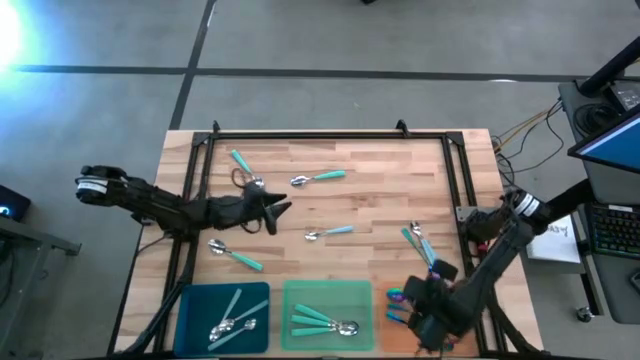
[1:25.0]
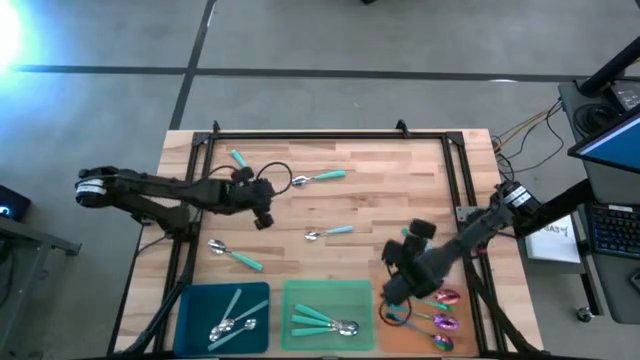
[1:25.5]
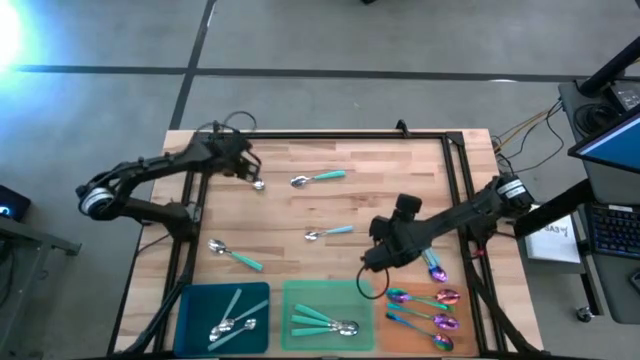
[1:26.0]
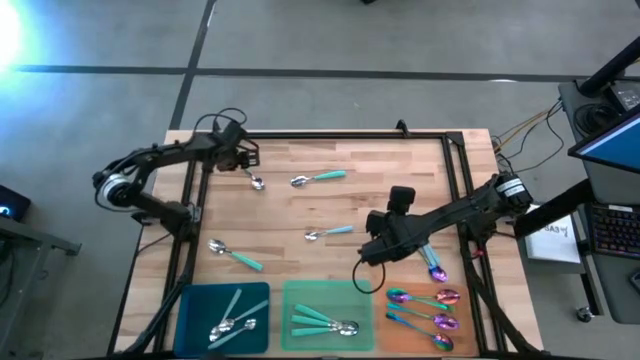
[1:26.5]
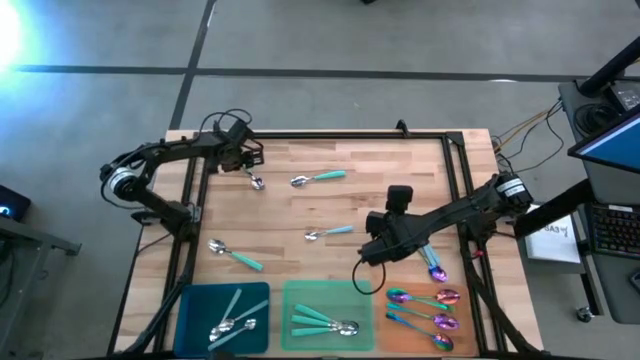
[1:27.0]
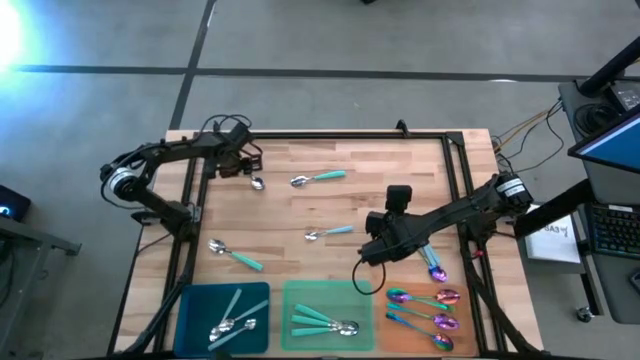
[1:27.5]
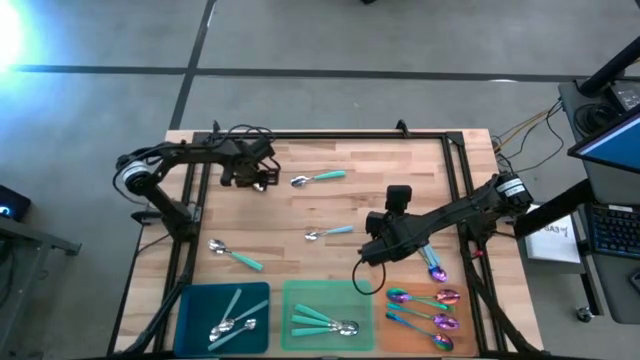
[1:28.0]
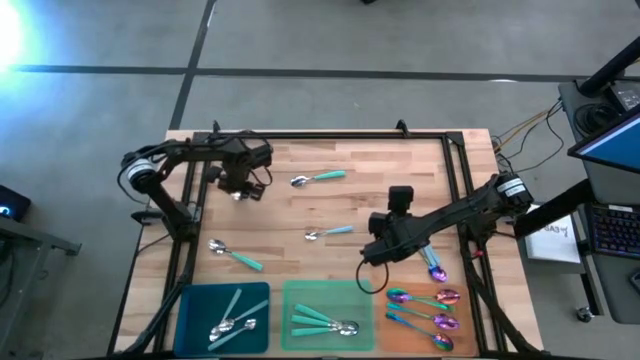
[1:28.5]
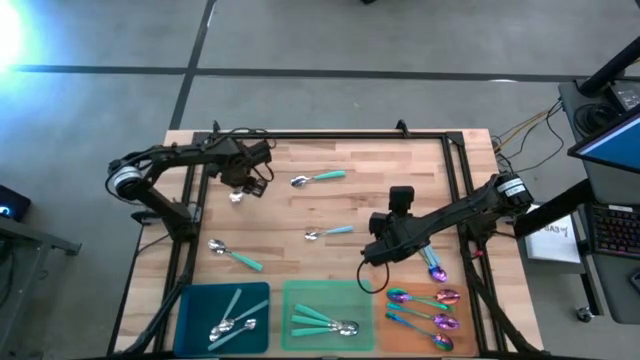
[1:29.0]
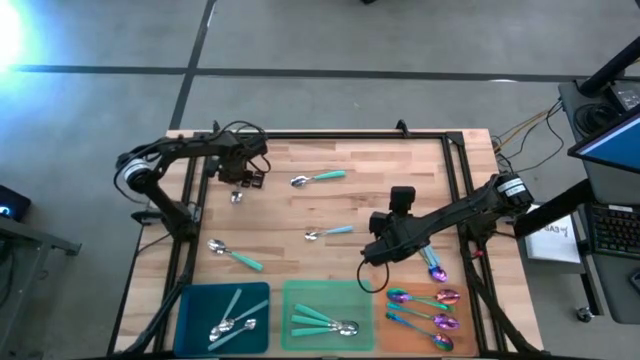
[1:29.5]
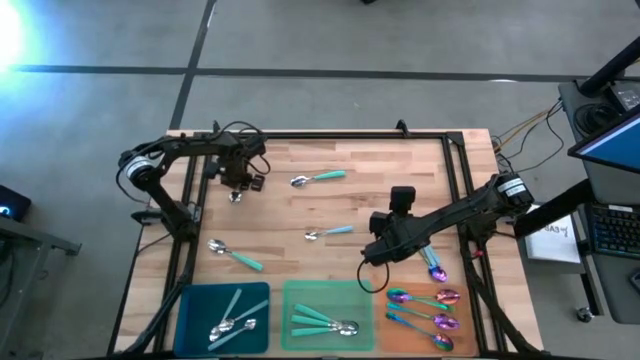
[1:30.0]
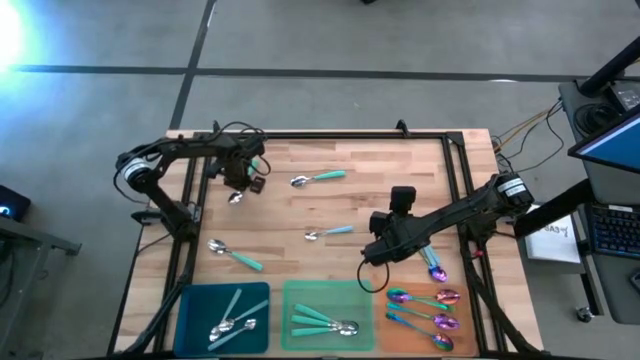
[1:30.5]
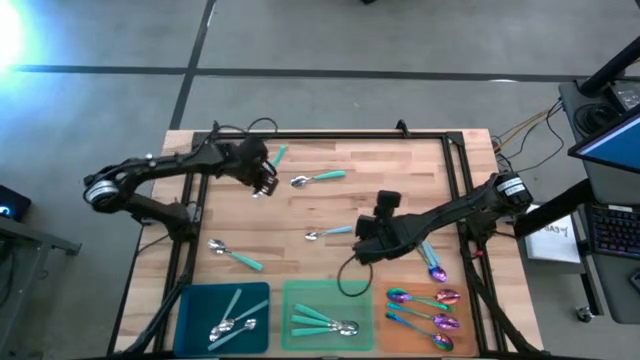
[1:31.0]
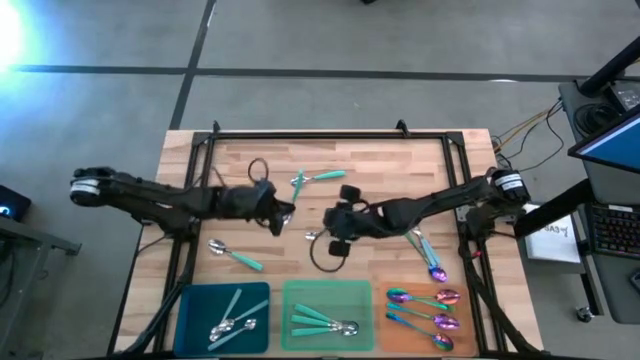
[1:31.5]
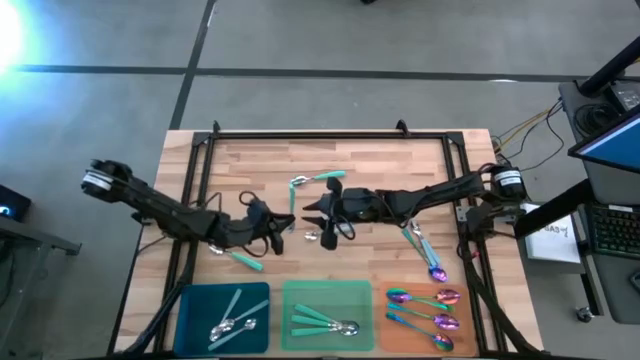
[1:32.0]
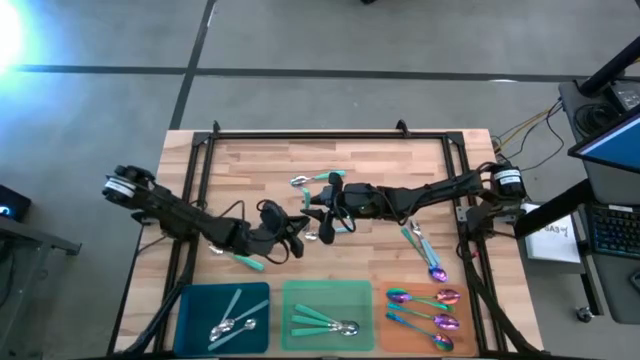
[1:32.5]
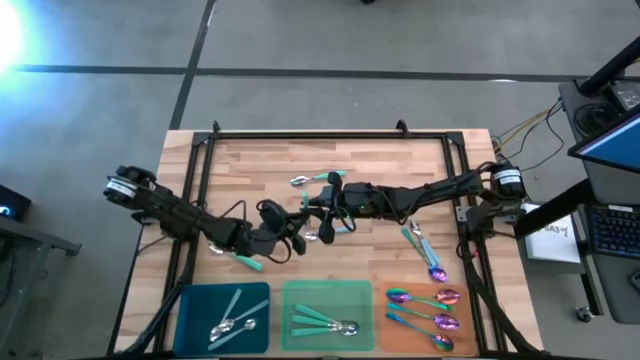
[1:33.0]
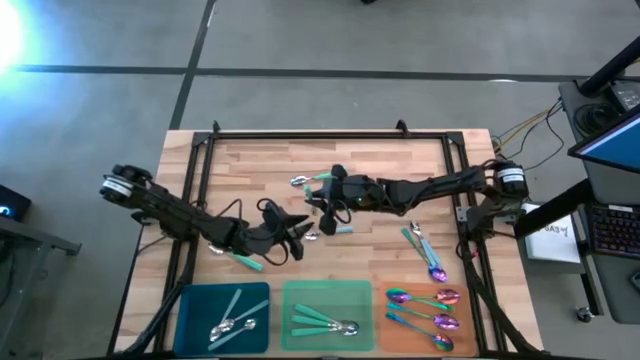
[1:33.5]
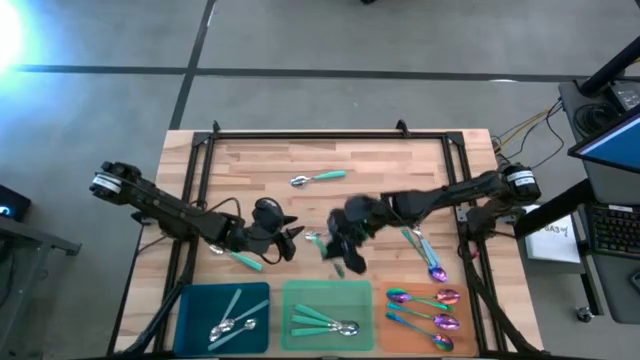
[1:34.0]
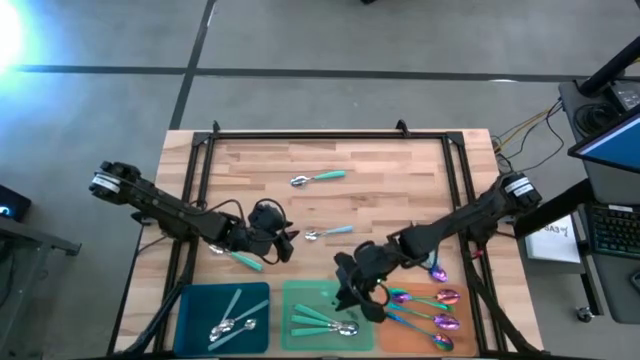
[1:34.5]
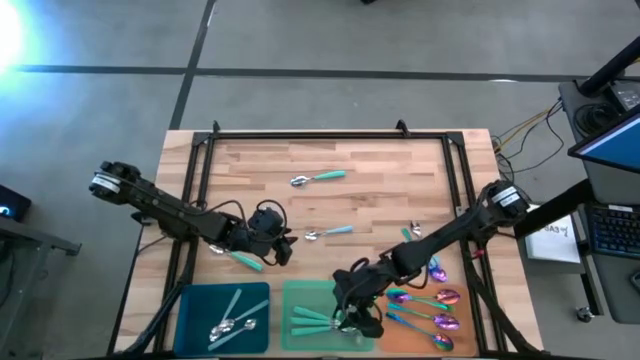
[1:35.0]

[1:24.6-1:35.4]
Task: Sort silverware by color (type)
Put the light green spoon into the light green bin

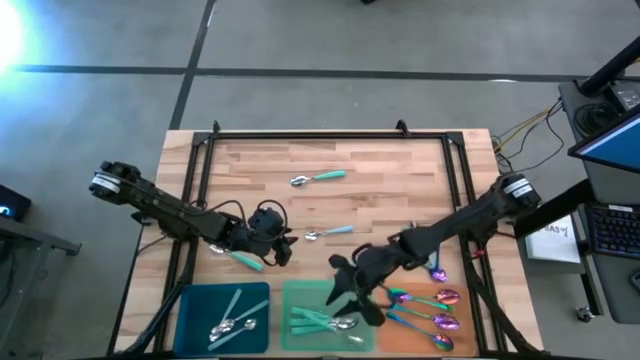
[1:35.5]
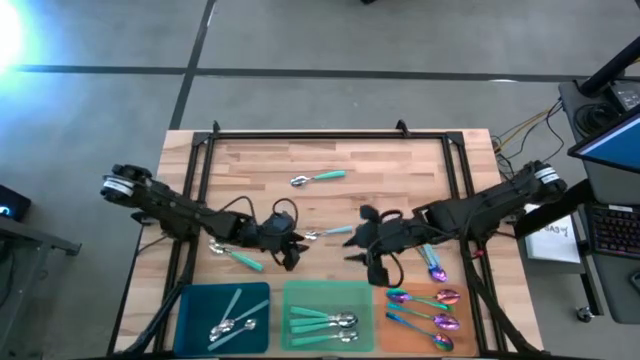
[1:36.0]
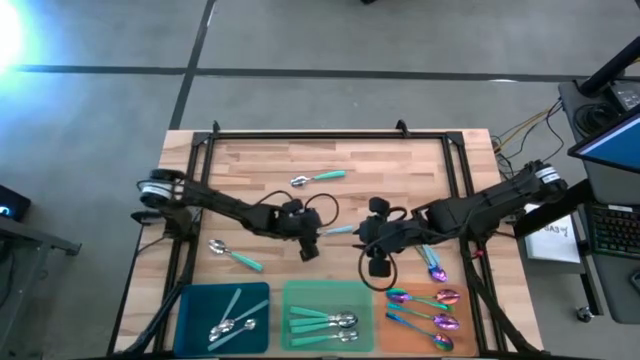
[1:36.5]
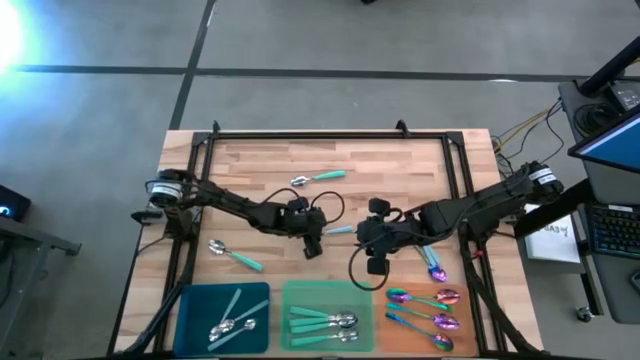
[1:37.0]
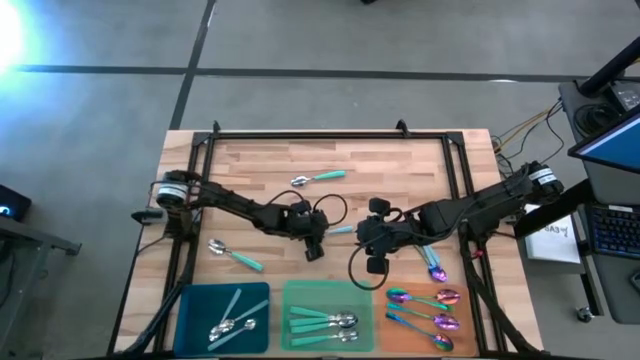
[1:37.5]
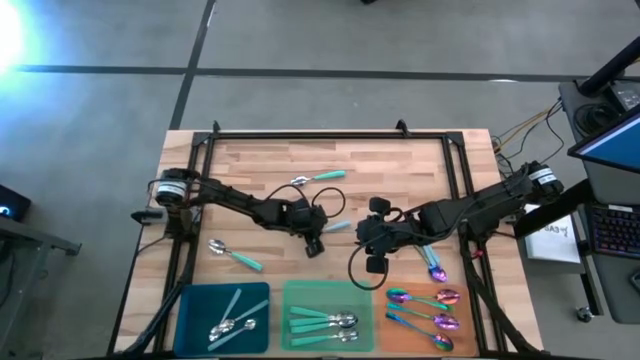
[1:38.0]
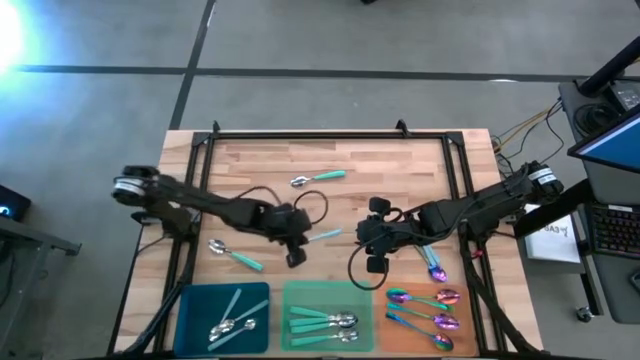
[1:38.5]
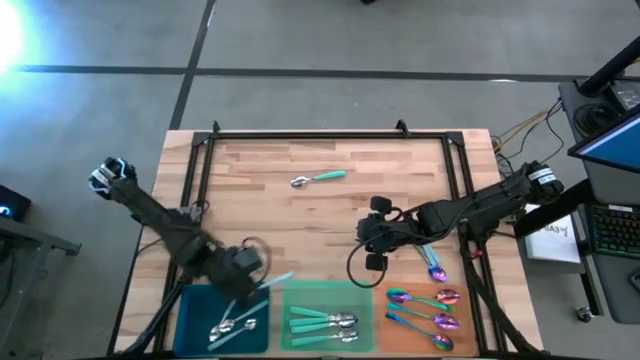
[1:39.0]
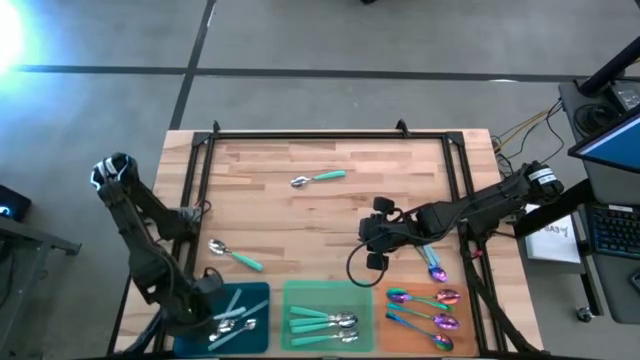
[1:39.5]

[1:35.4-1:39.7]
Put the light blue spoon into the blue bin

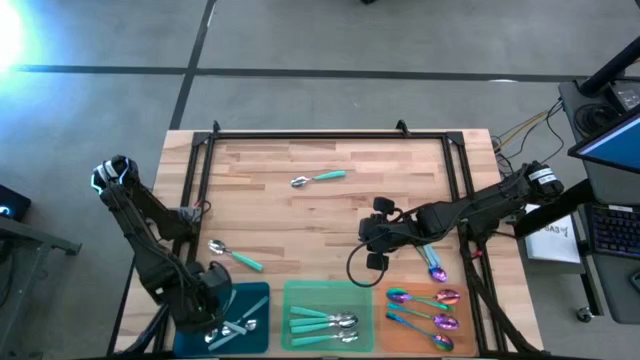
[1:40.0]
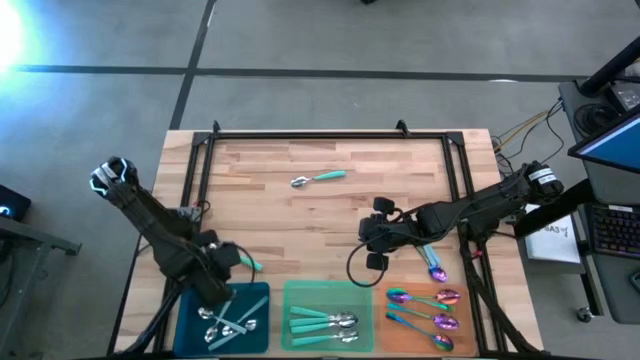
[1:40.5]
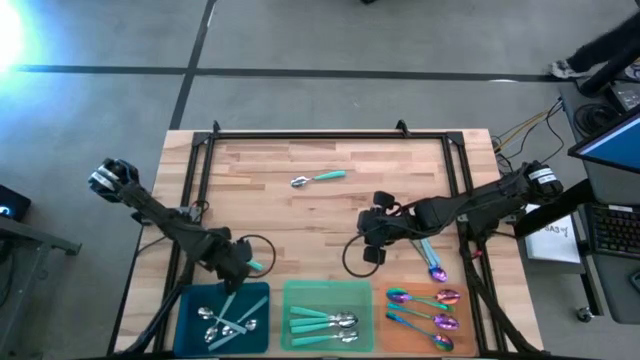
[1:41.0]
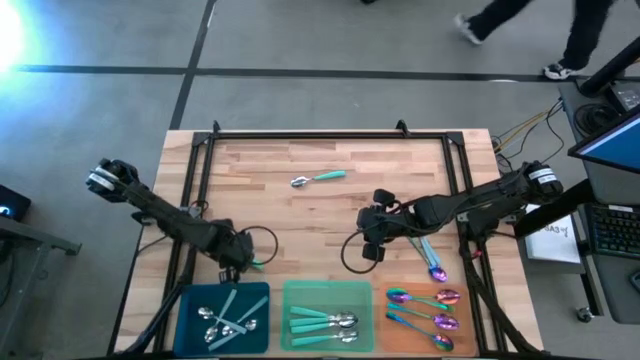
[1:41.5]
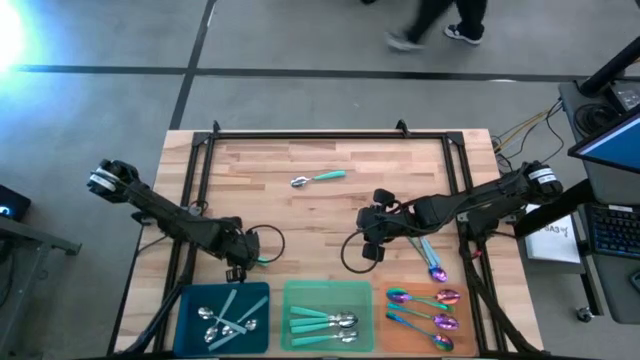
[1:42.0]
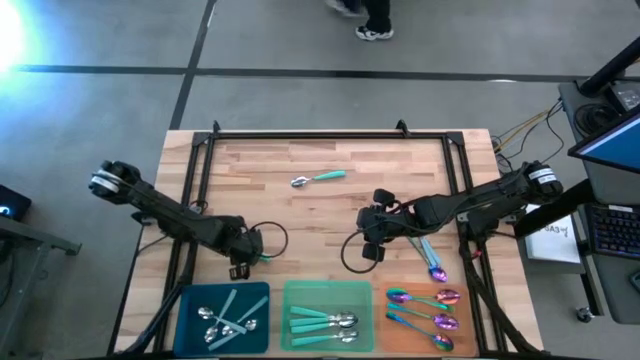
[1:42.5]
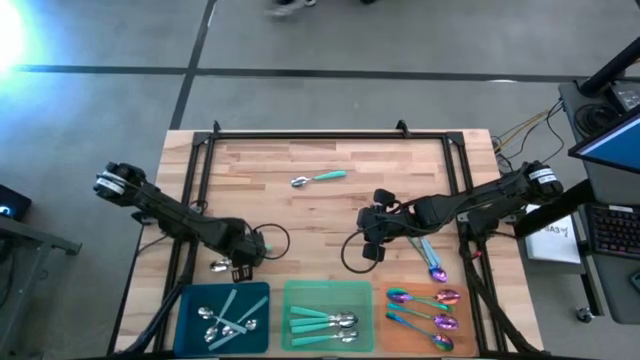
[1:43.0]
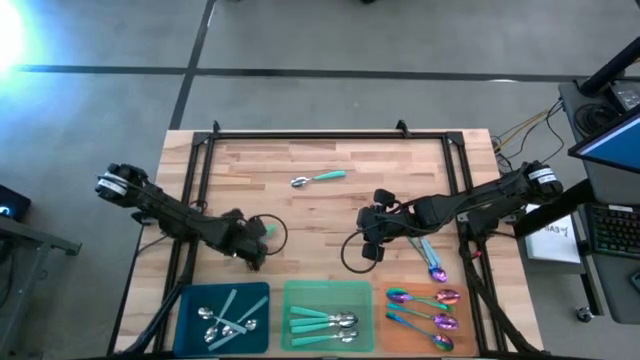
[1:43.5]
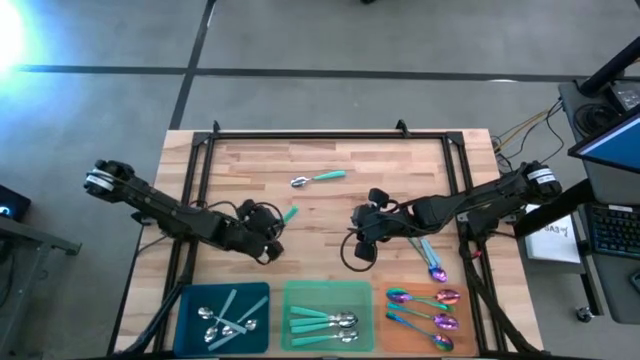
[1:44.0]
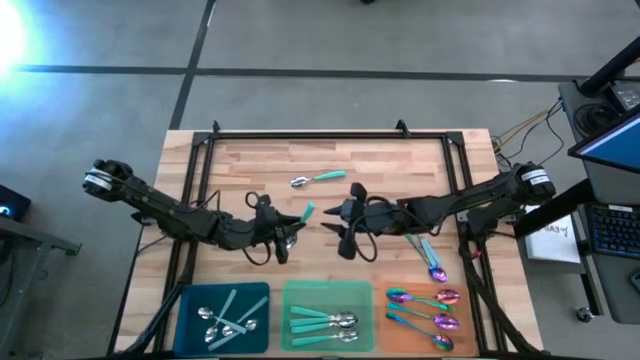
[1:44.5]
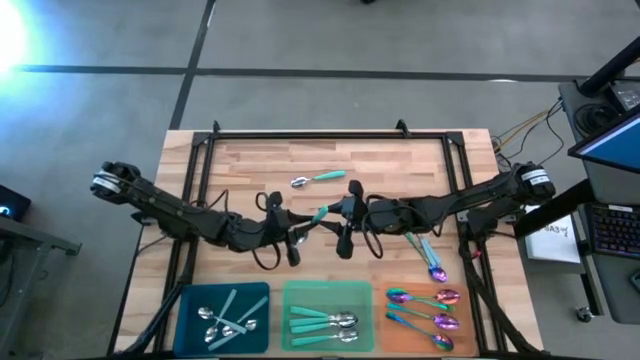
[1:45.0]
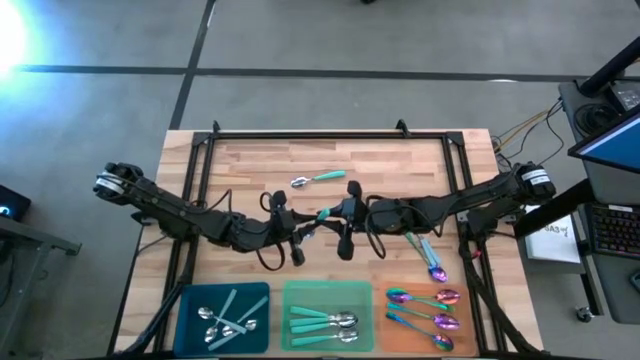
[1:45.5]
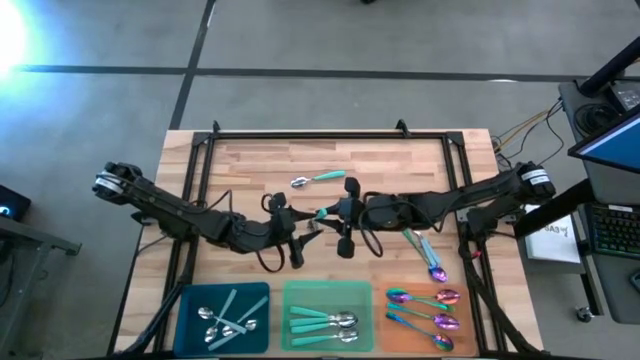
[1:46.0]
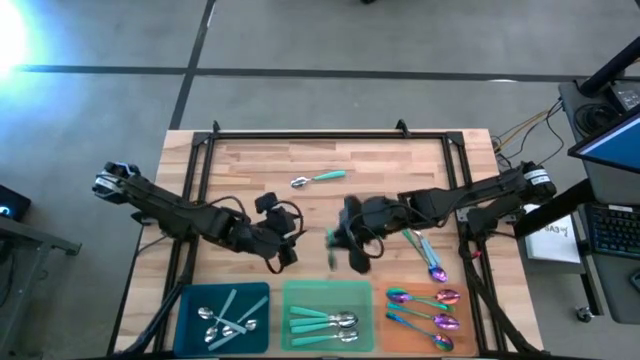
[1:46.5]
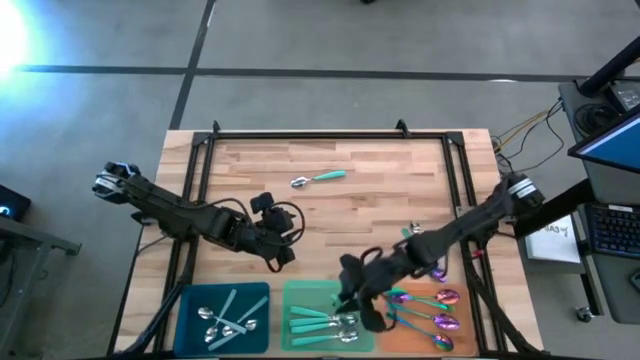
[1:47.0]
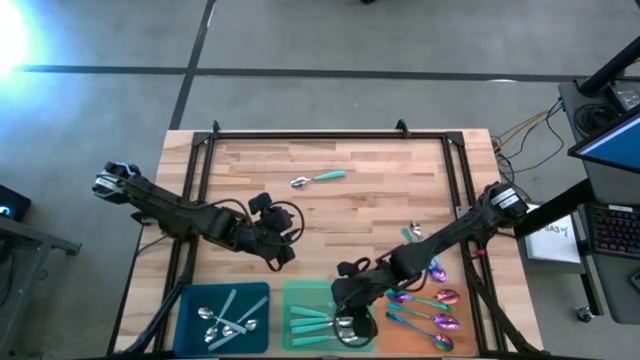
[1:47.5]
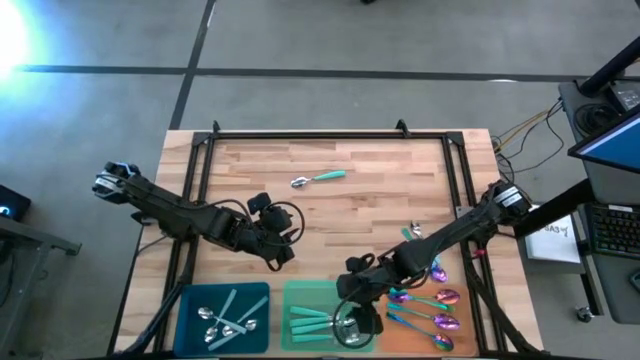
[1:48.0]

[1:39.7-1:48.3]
Put the light green spoon into the light green bin
